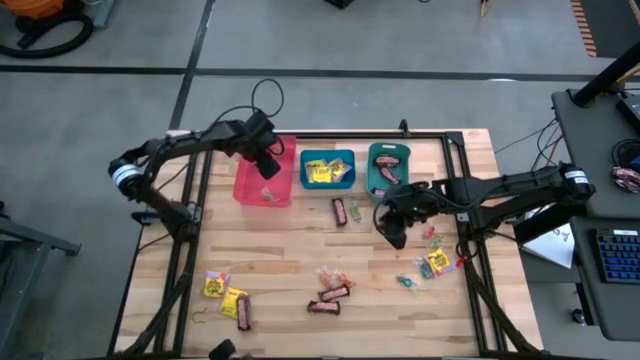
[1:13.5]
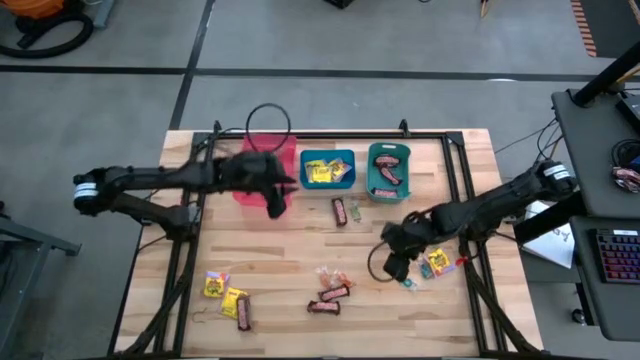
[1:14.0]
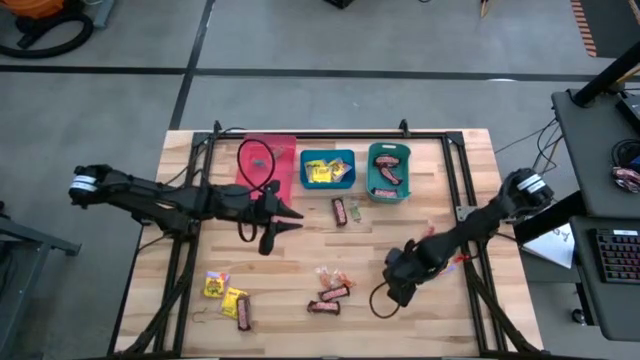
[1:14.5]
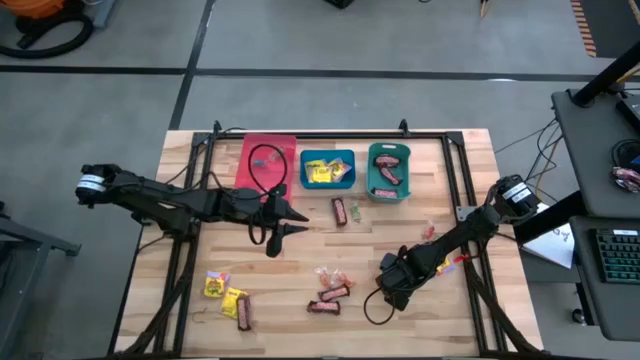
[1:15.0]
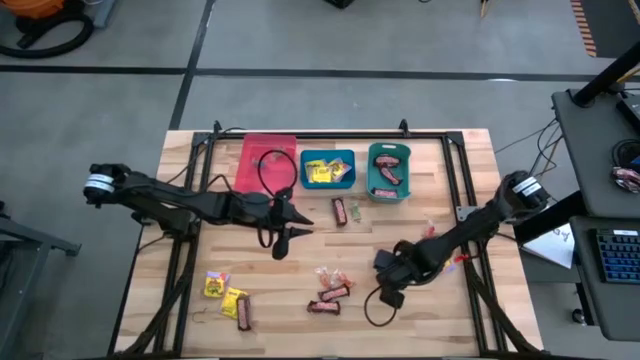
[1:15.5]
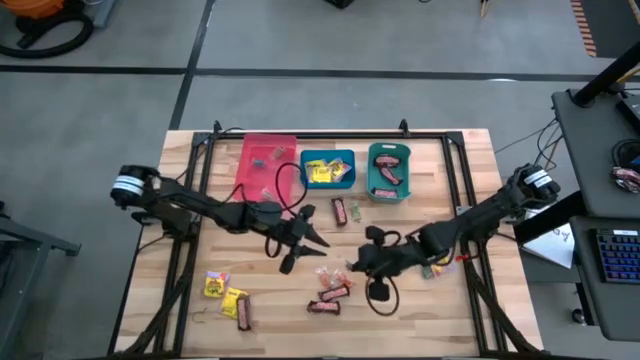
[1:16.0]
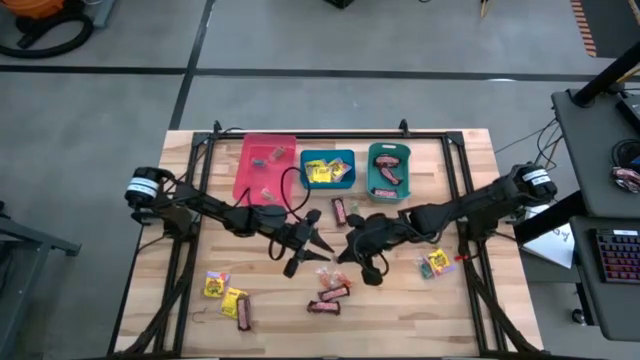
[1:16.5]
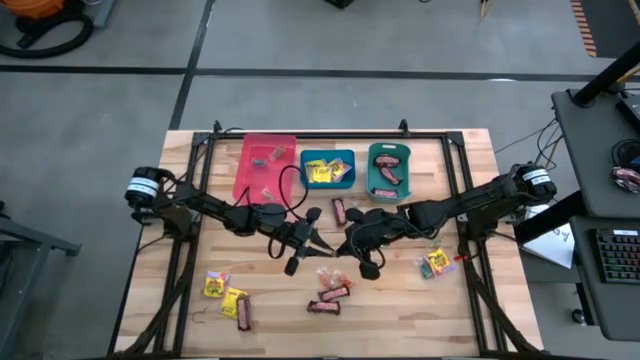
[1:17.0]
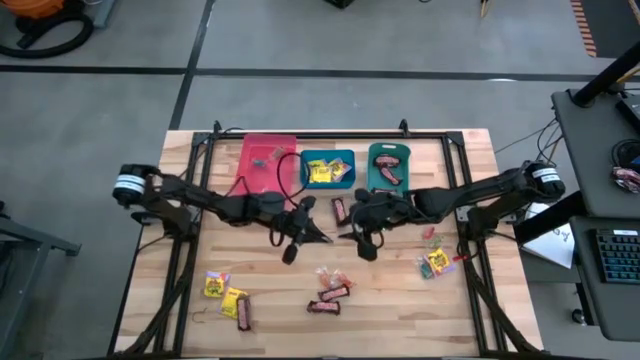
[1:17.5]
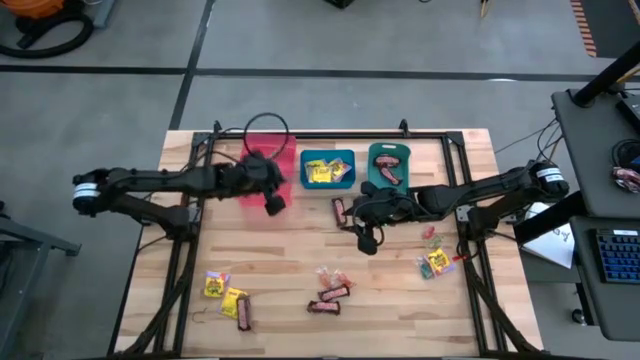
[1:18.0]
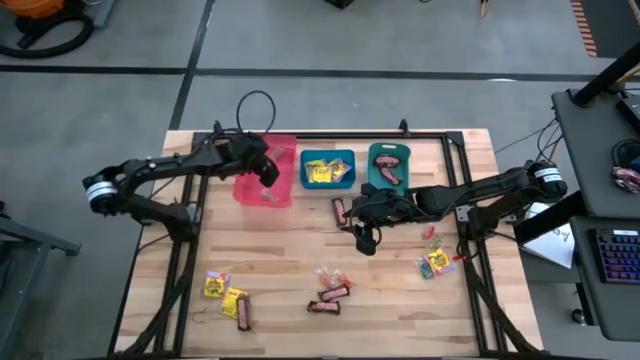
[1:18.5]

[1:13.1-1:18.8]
Task: Sort candy
Put the left blue candy into the red bin

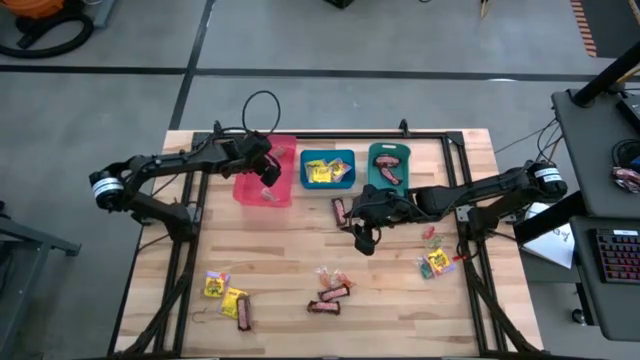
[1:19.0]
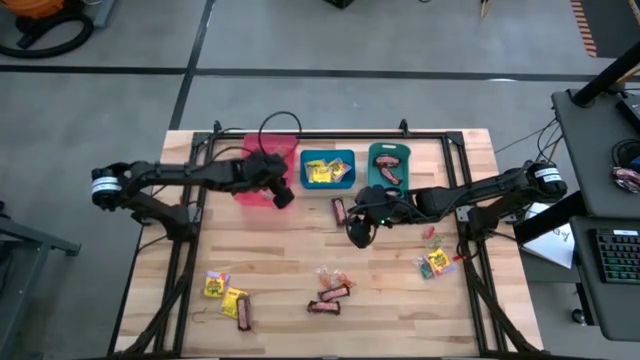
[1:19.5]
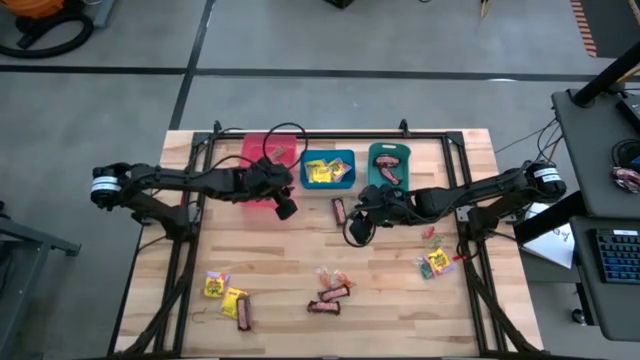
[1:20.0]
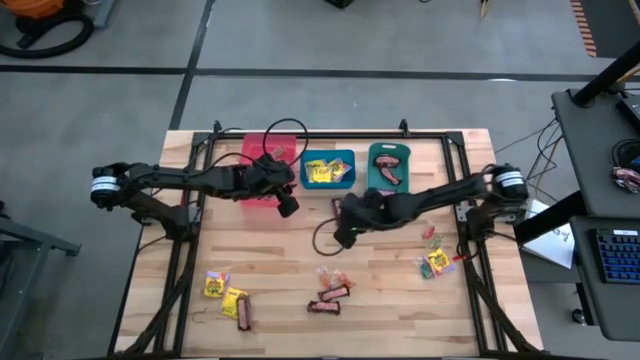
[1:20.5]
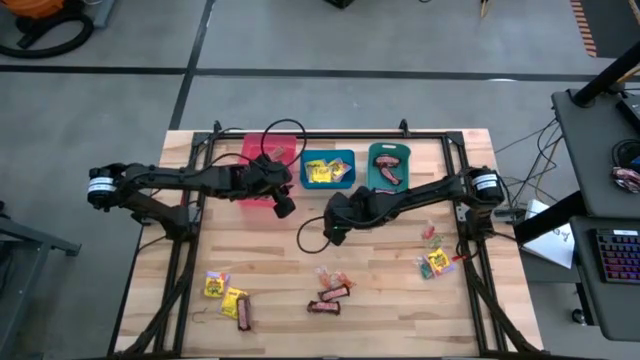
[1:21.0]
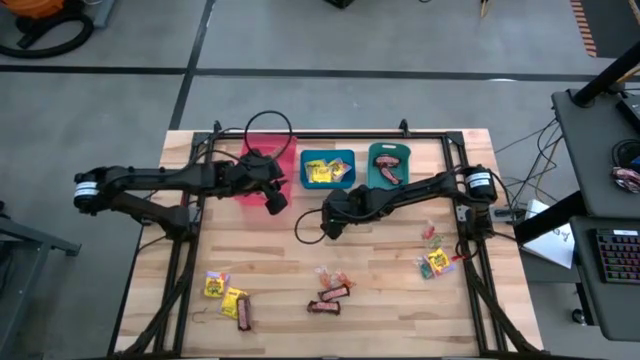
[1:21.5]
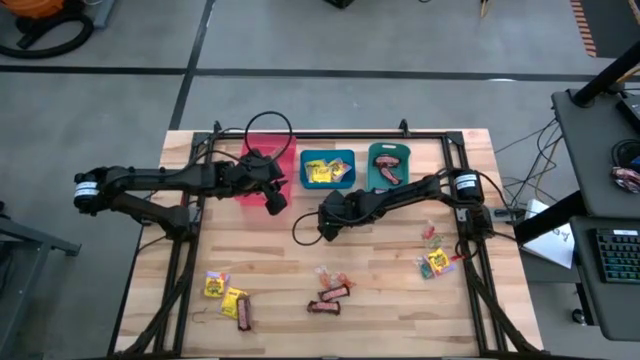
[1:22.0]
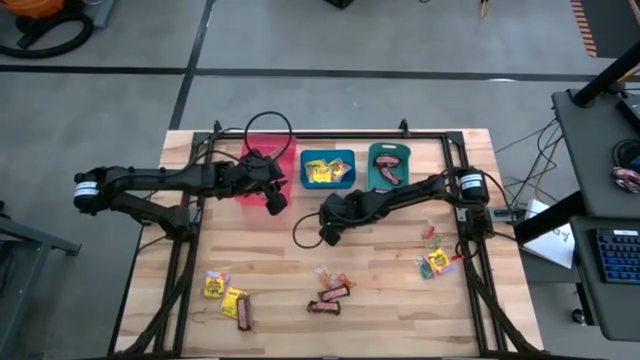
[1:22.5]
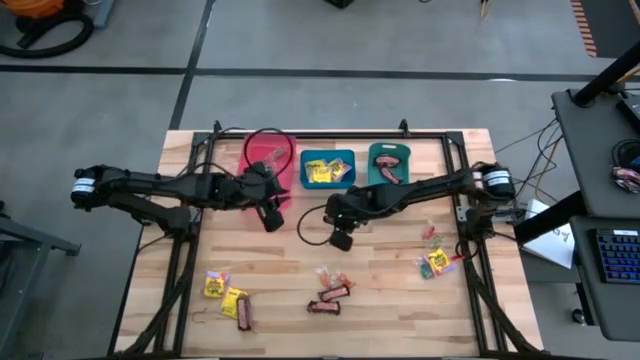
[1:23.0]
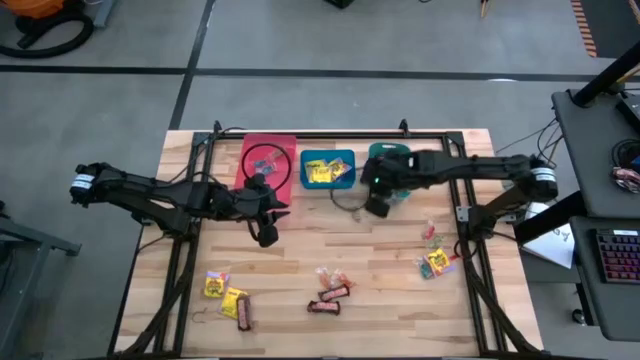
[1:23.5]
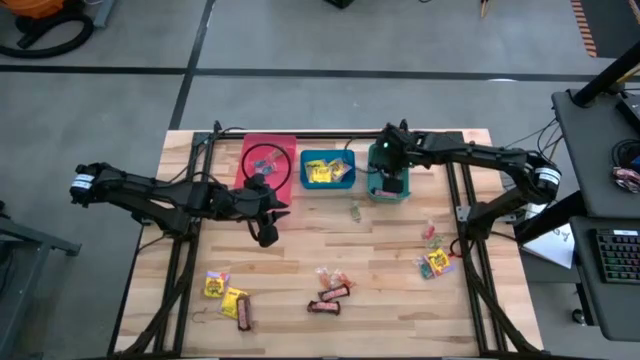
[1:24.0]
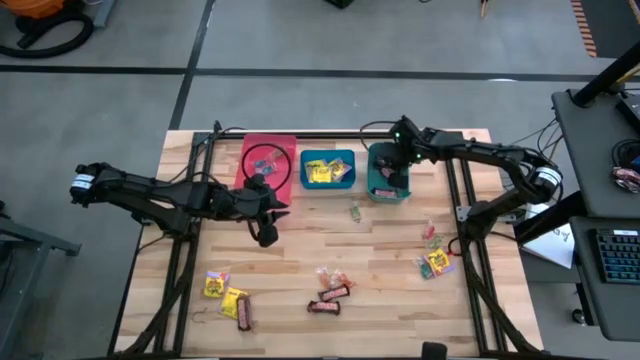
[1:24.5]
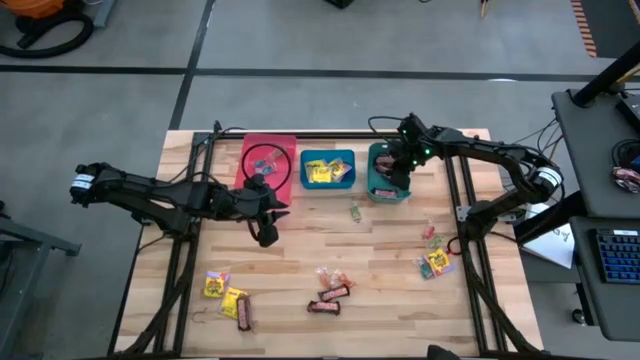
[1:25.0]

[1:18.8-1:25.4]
Put the top brown candy into the green bin

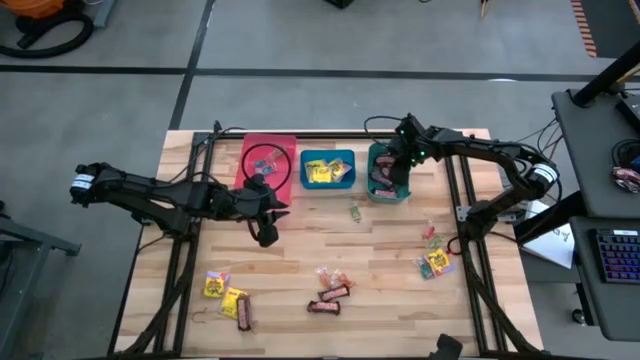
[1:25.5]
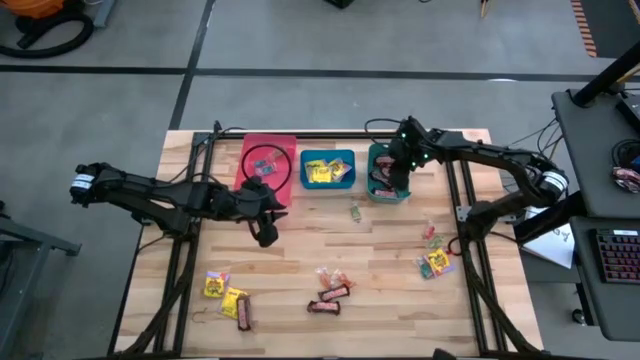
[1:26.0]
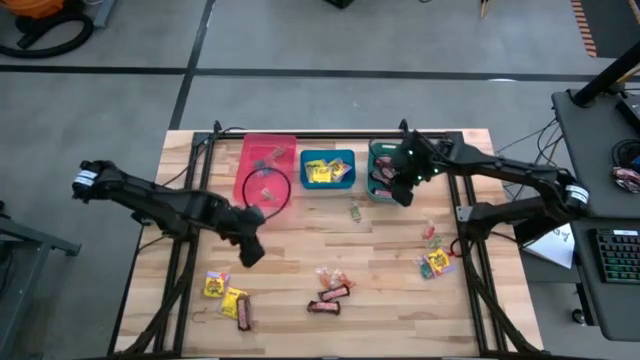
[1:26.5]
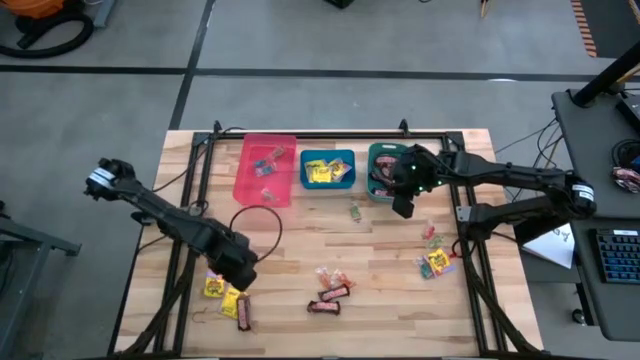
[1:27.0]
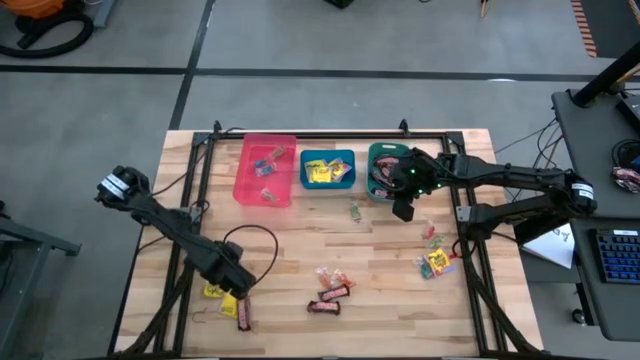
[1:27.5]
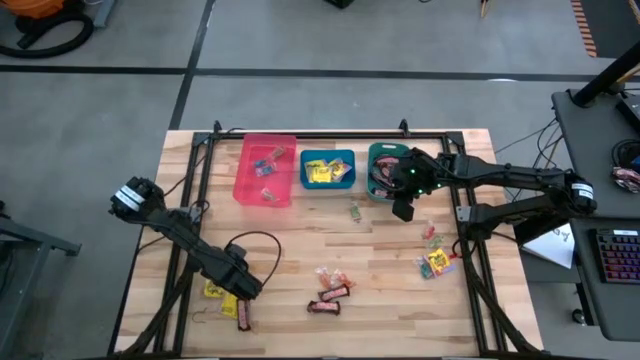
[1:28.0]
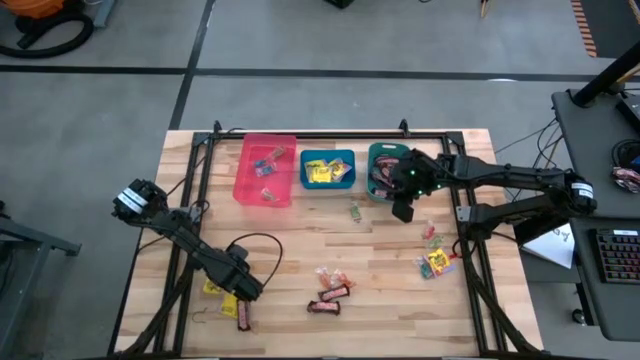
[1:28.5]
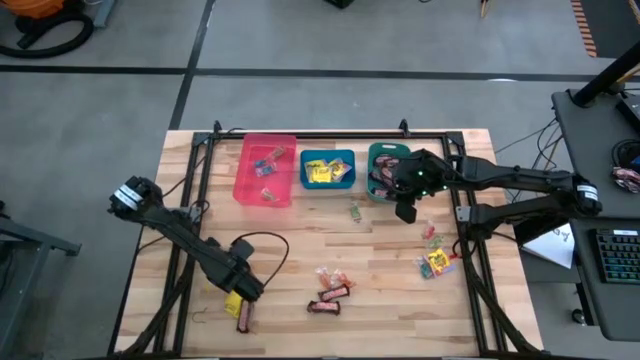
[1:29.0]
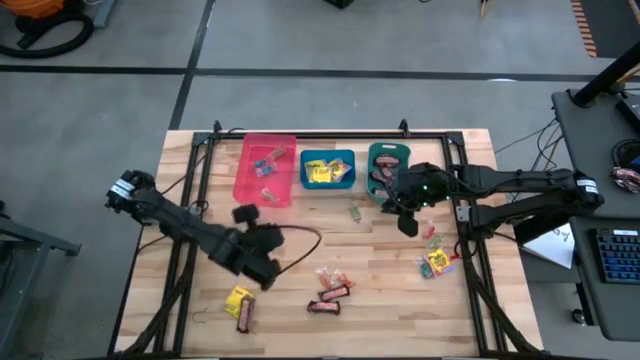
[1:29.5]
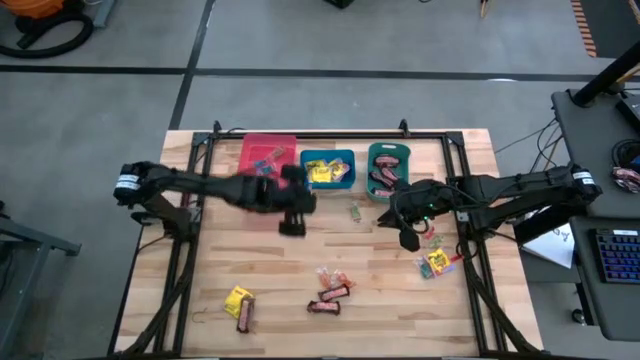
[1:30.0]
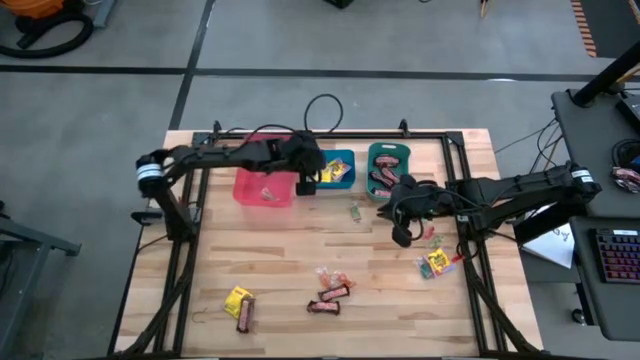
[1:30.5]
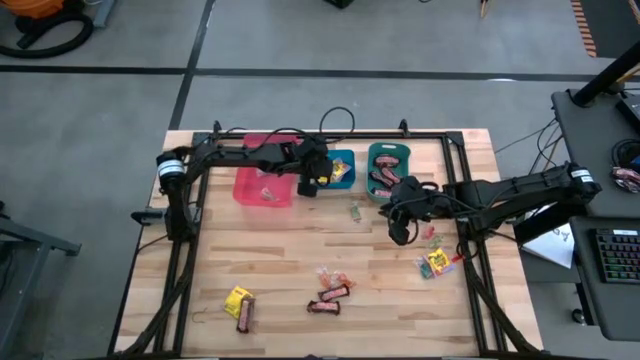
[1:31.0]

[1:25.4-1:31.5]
Put the left yellow candy into the blue bin

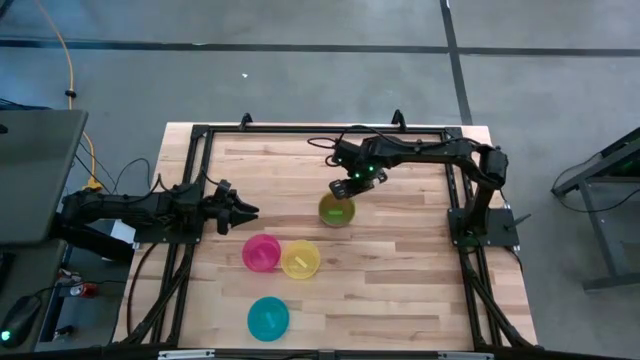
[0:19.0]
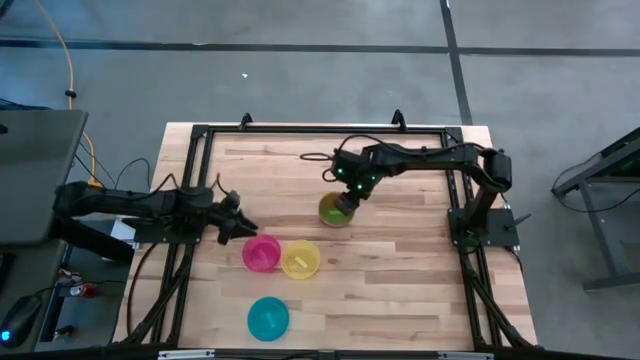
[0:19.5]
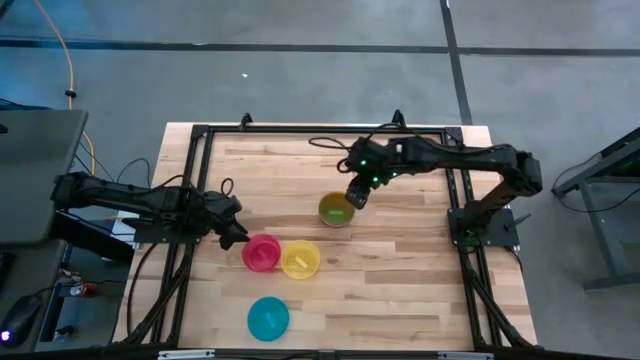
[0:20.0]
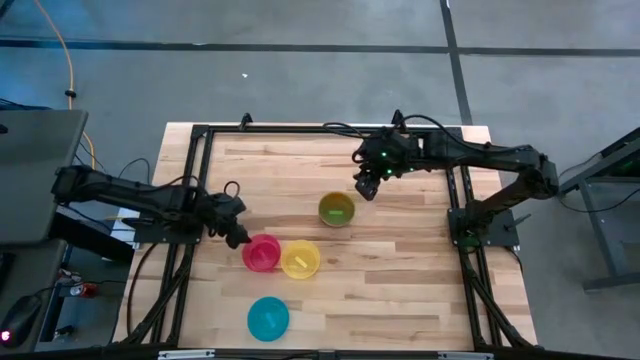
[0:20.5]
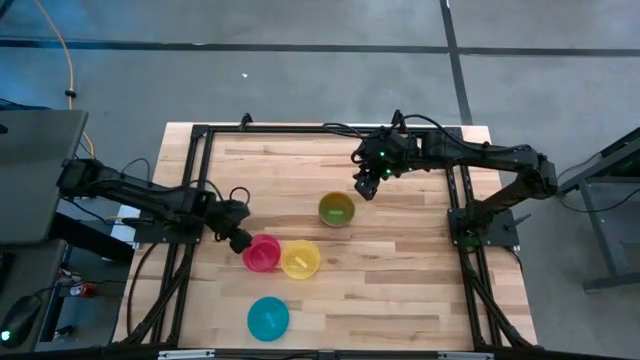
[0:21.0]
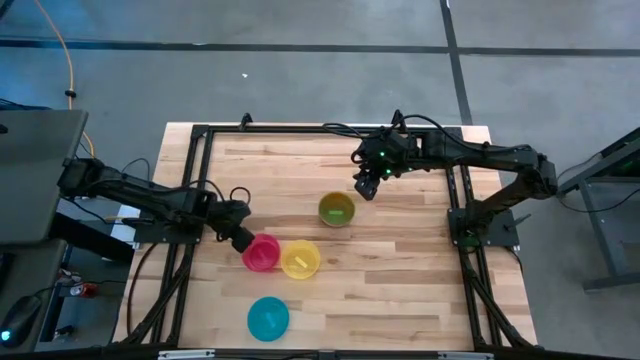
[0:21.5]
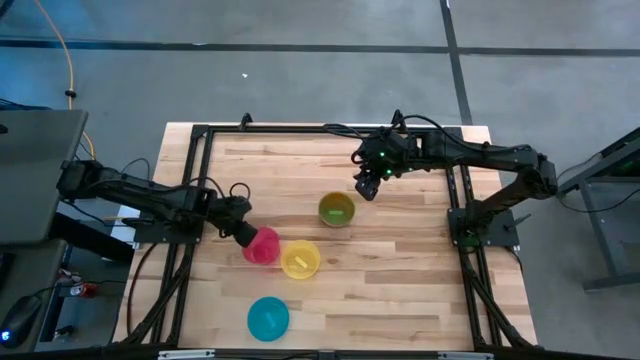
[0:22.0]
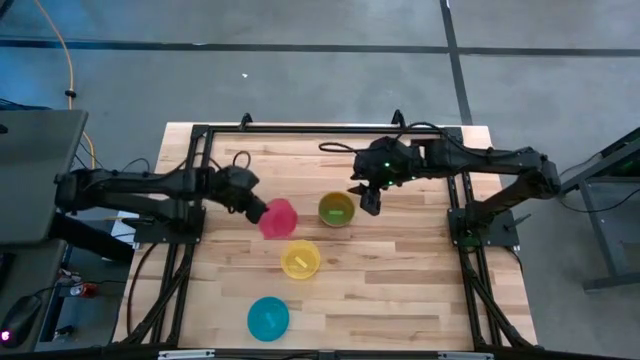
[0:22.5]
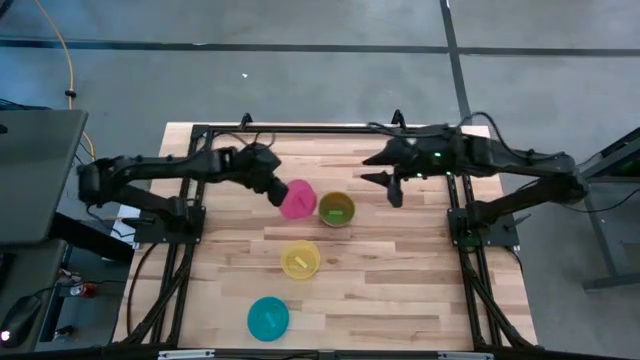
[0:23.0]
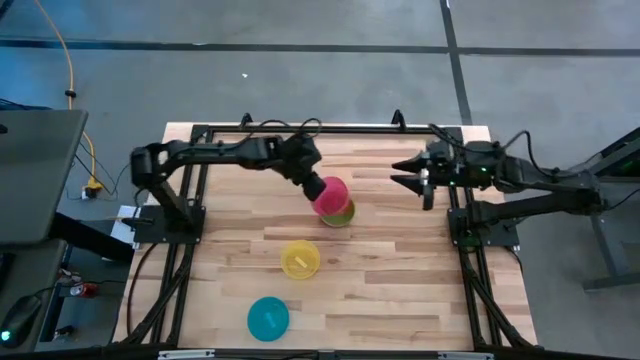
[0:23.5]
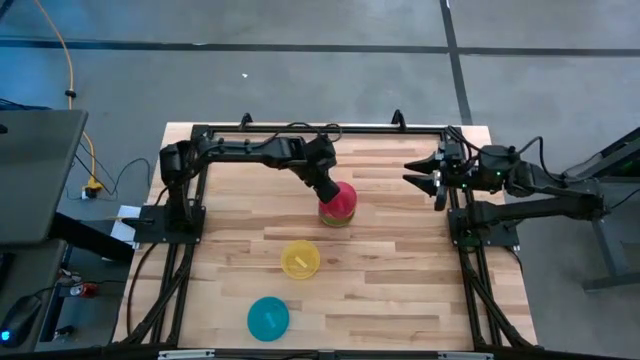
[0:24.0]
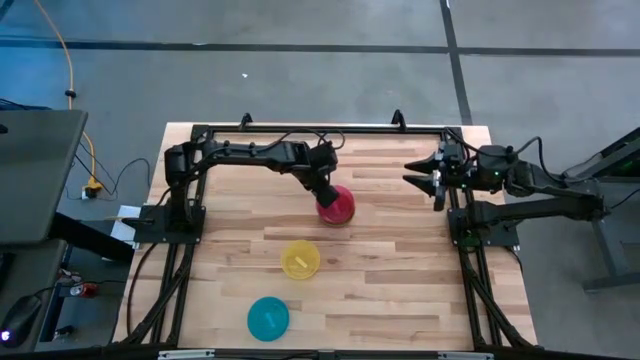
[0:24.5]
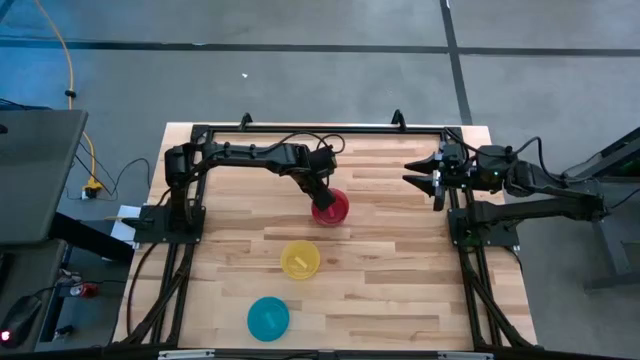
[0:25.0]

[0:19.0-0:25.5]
Task: Nest bowls inside each other
Stack the red bowl on the green bowl
